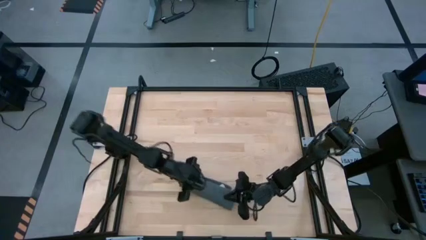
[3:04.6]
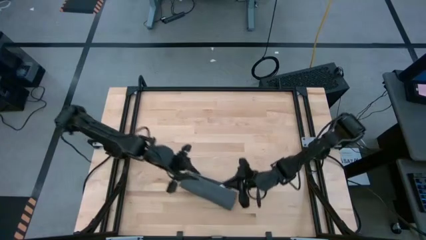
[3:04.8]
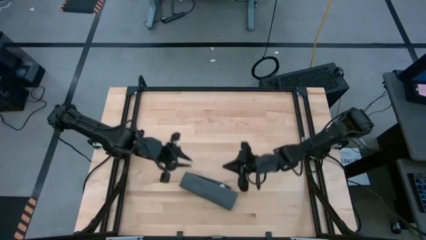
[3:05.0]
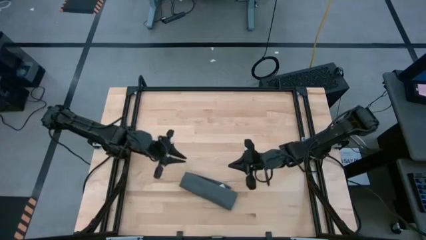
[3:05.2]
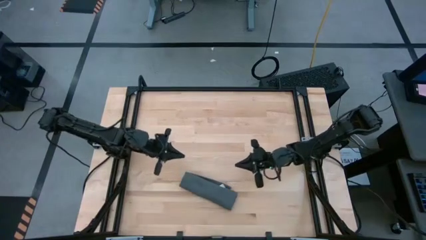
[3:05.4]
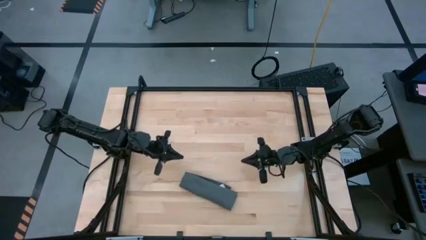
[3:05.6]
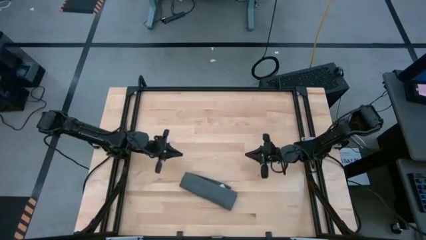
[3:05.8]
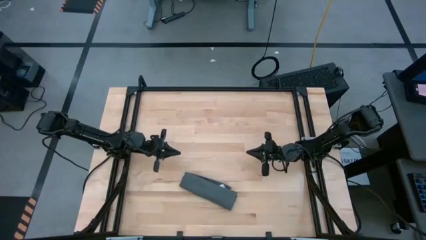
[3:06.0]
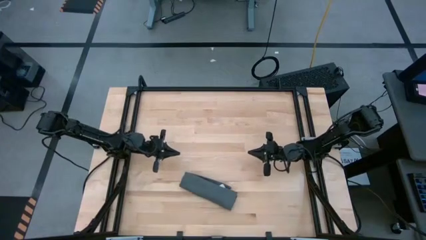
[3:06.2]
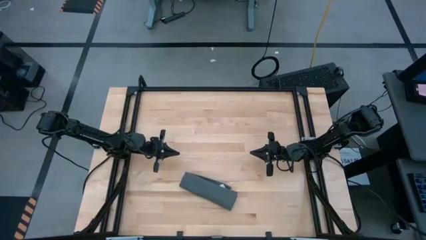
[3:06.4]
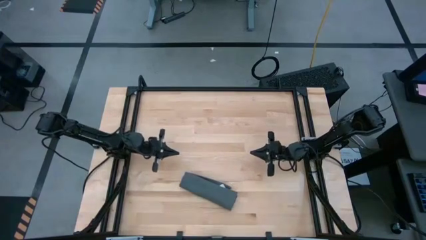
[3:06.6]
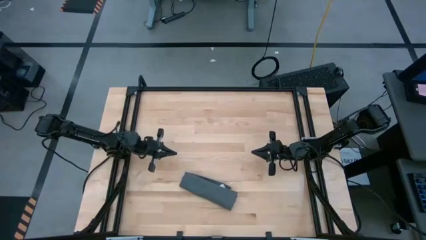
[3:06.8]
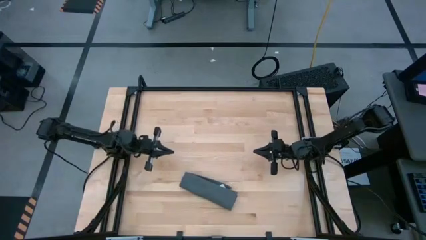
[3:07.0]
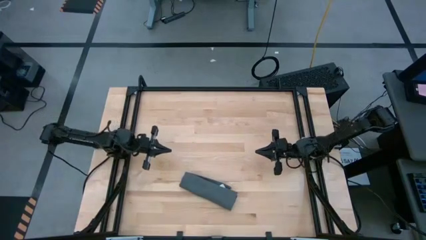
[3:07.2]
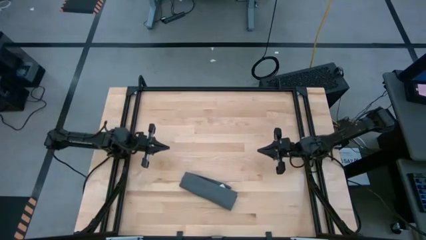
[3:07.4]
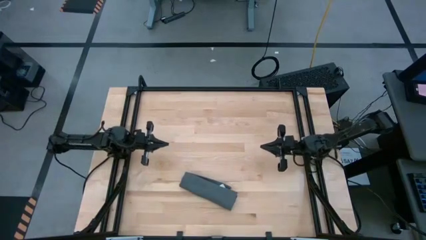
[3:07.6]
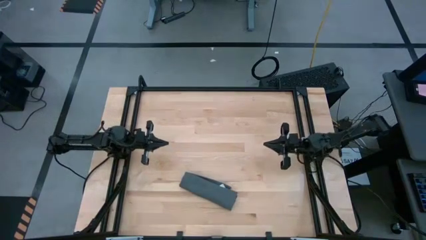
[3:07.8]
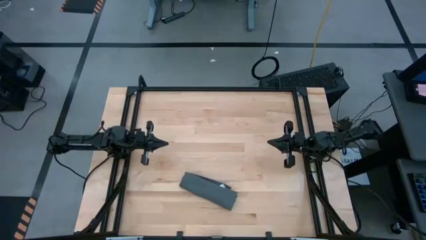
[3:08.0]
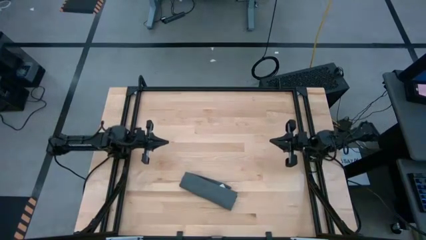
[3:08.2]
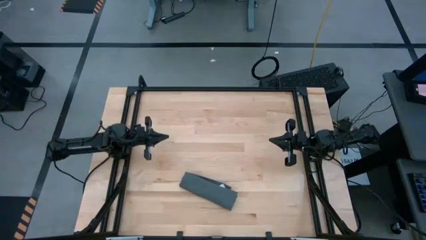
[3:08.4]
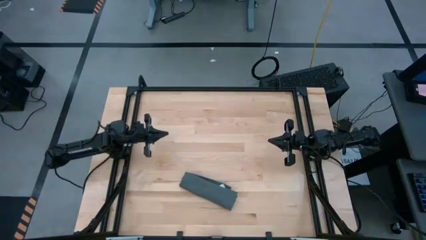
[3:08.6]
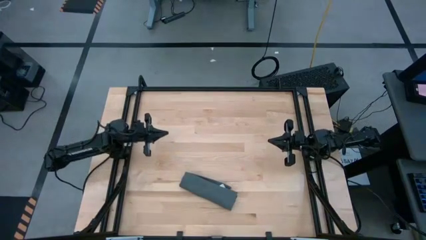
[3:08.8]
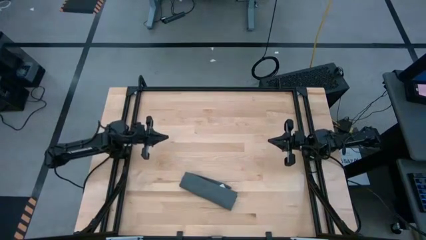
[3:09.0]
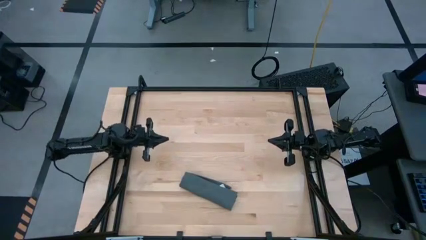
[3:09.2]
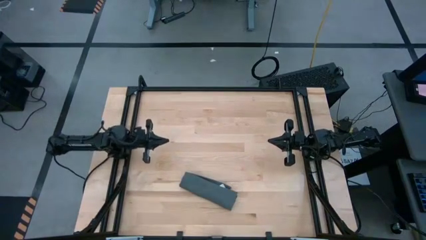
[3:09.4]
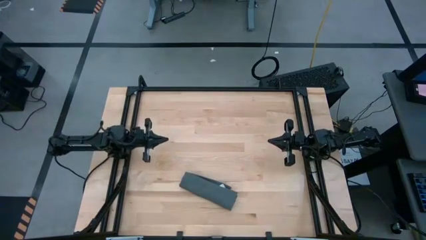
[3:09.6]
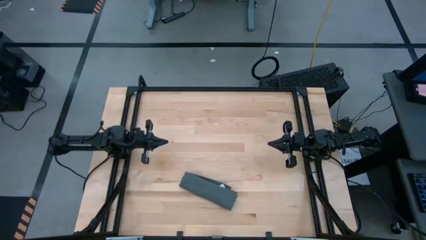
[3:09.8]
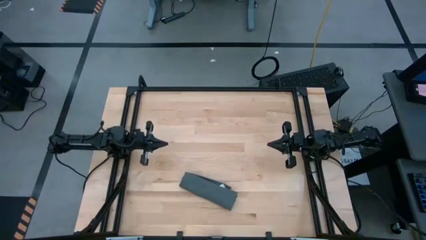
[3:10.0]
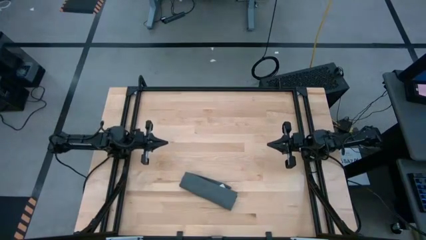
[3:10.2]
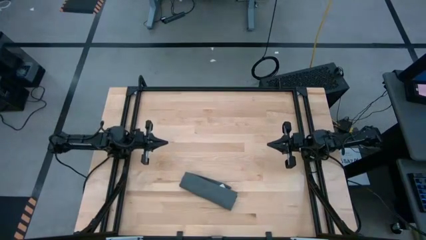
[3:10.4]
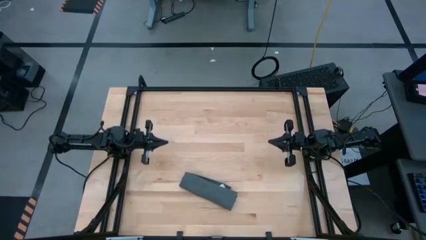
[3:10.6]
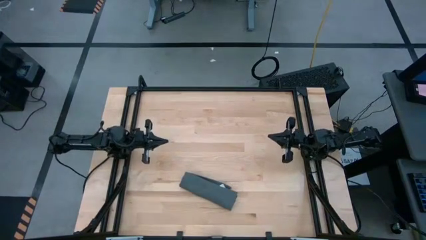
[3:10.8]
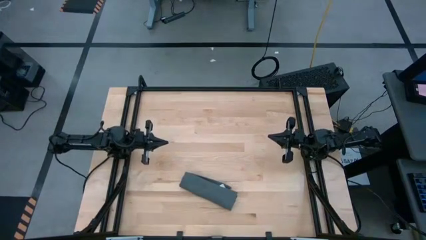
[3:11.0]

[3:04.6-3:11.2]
Task: Roll towel
Return to Home Position

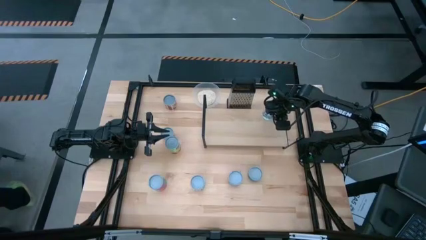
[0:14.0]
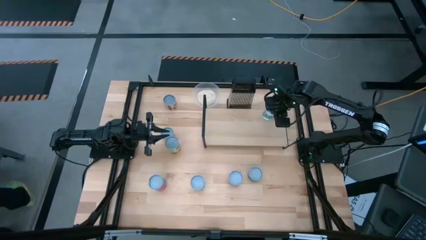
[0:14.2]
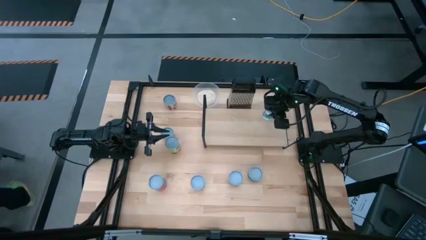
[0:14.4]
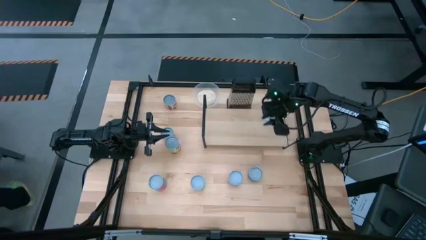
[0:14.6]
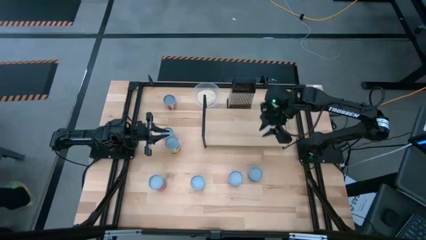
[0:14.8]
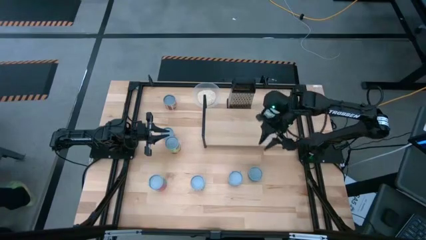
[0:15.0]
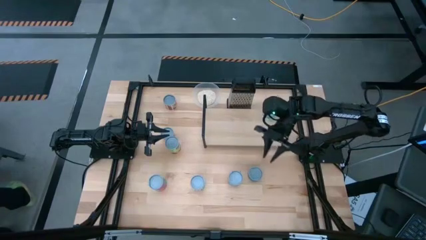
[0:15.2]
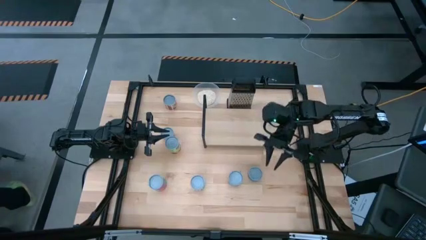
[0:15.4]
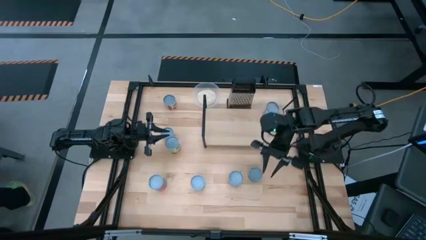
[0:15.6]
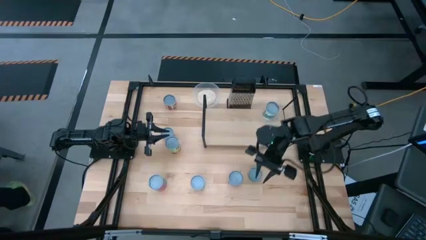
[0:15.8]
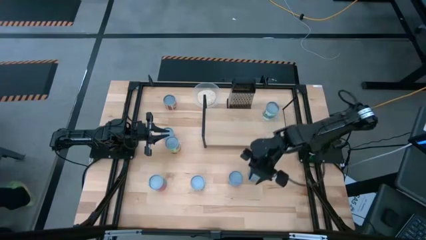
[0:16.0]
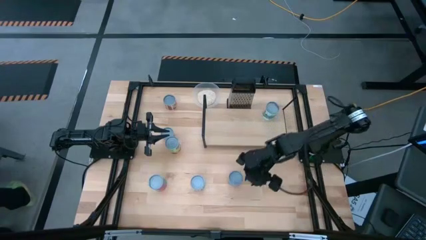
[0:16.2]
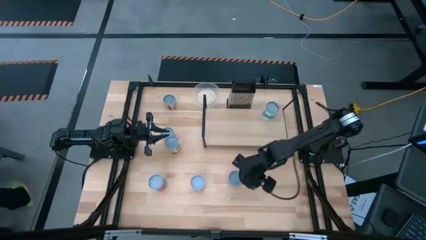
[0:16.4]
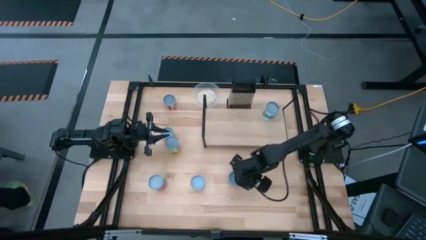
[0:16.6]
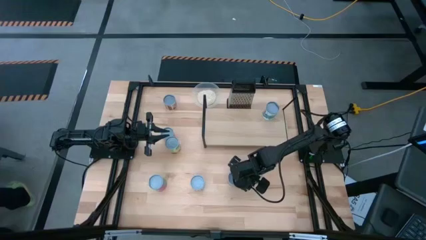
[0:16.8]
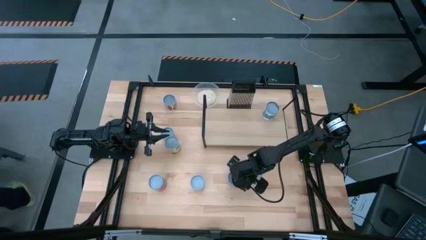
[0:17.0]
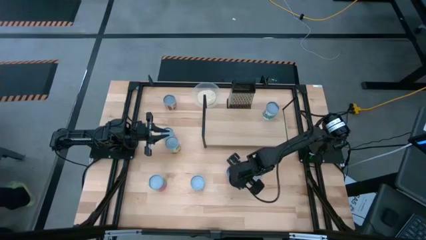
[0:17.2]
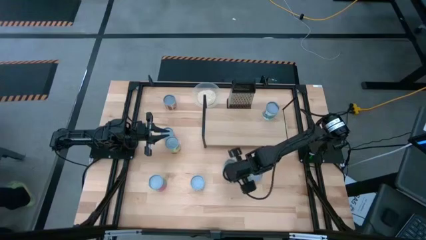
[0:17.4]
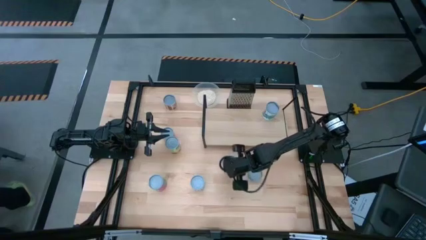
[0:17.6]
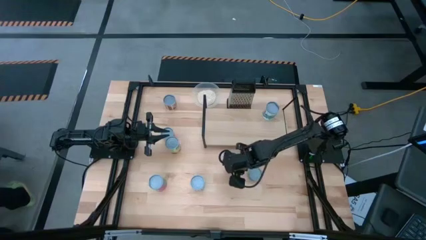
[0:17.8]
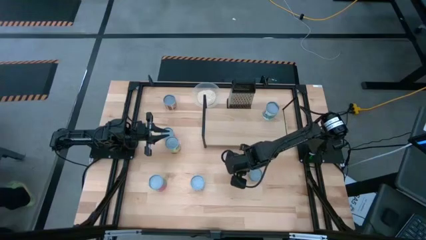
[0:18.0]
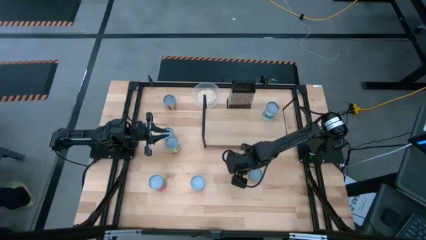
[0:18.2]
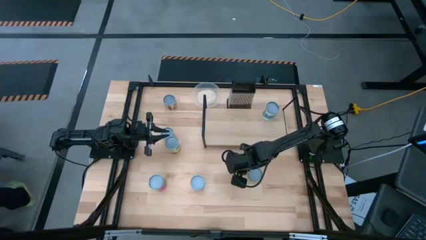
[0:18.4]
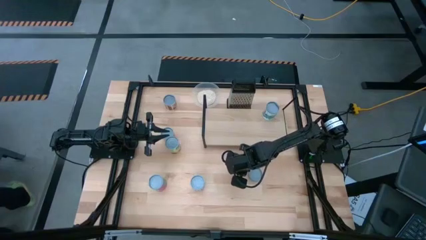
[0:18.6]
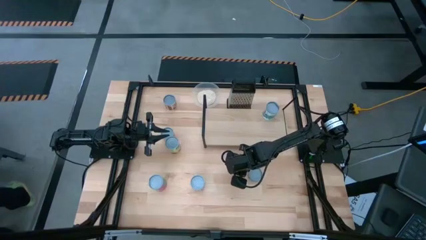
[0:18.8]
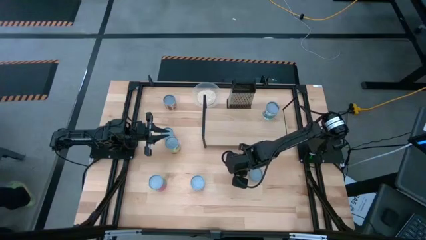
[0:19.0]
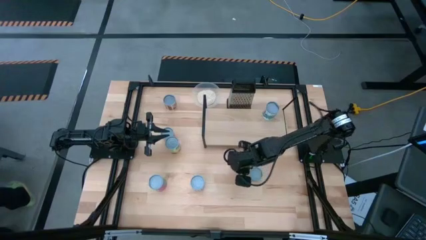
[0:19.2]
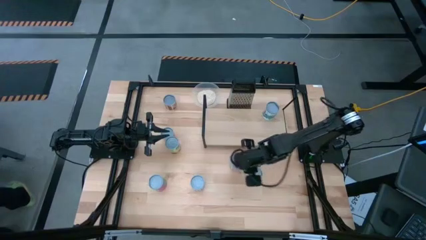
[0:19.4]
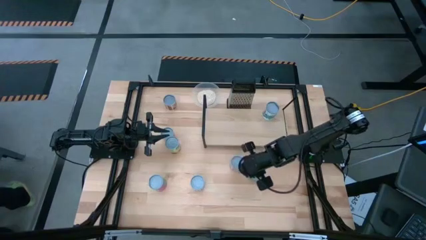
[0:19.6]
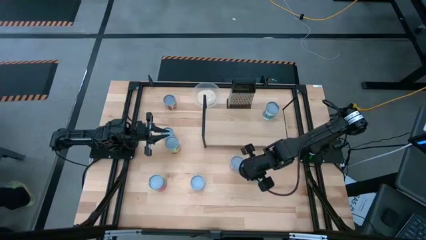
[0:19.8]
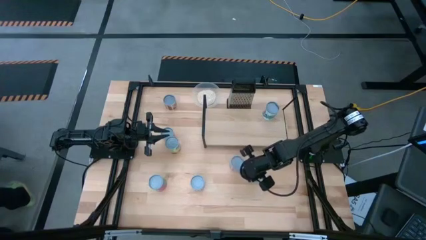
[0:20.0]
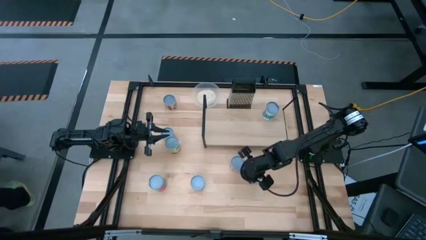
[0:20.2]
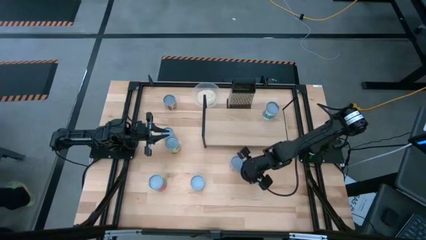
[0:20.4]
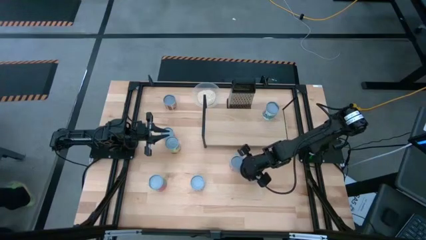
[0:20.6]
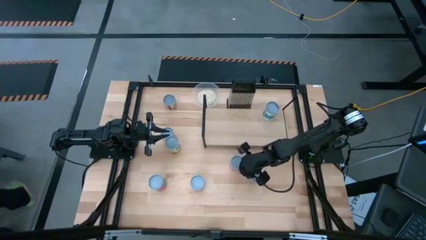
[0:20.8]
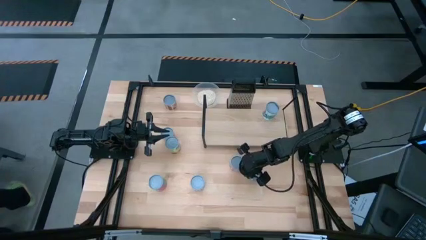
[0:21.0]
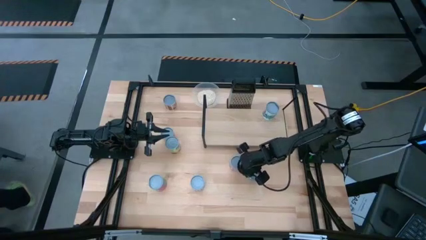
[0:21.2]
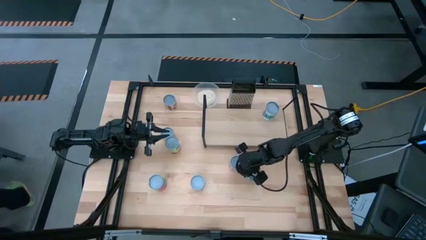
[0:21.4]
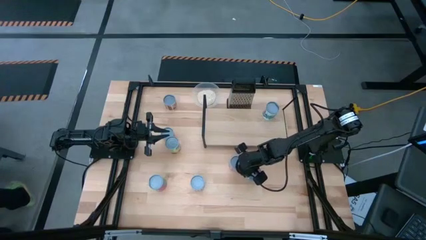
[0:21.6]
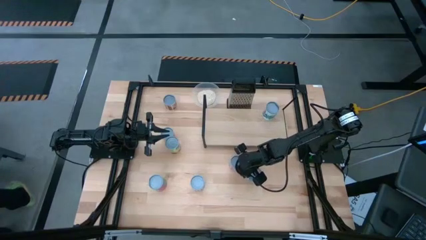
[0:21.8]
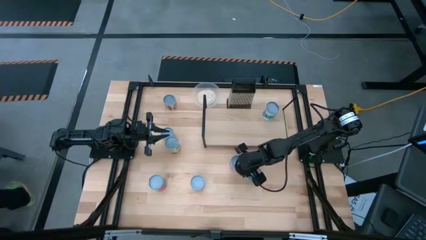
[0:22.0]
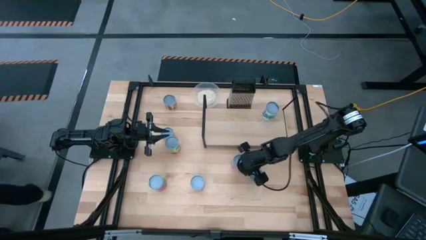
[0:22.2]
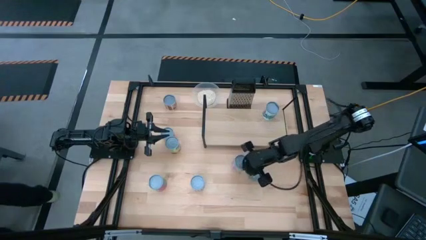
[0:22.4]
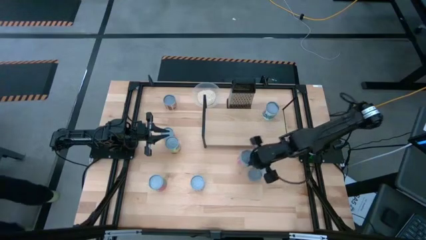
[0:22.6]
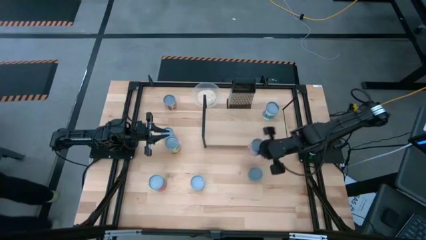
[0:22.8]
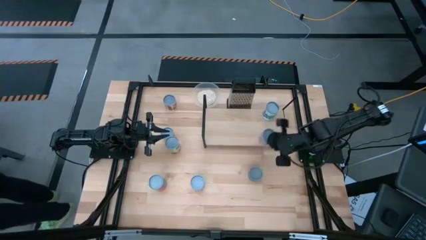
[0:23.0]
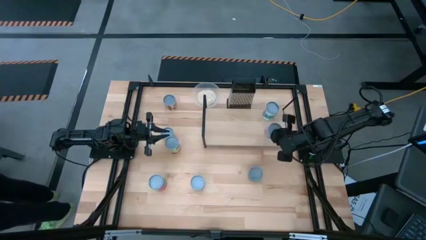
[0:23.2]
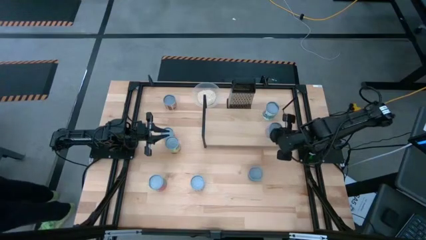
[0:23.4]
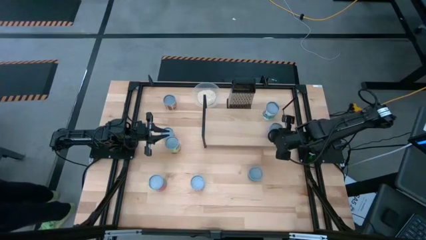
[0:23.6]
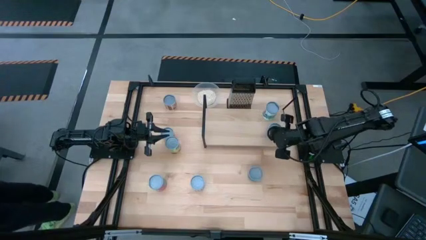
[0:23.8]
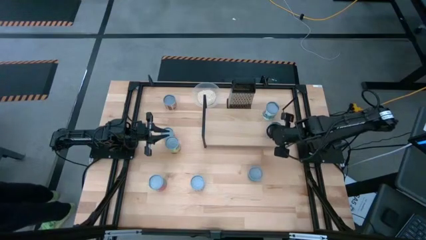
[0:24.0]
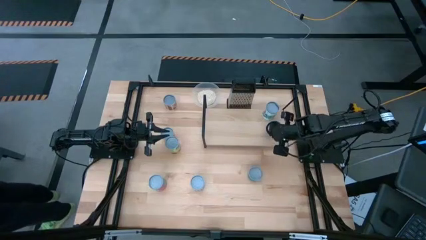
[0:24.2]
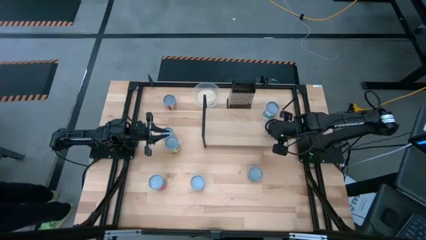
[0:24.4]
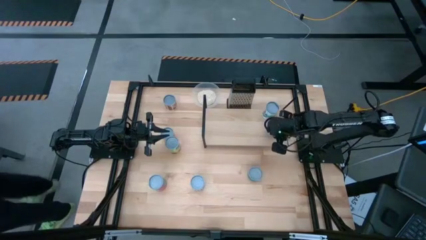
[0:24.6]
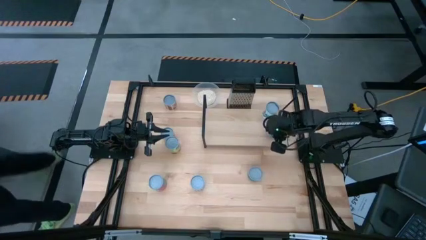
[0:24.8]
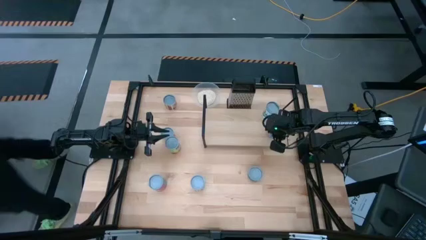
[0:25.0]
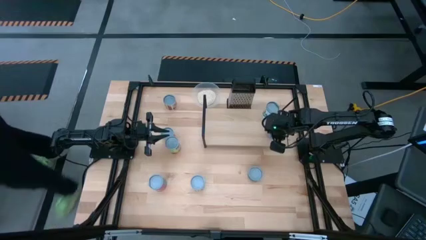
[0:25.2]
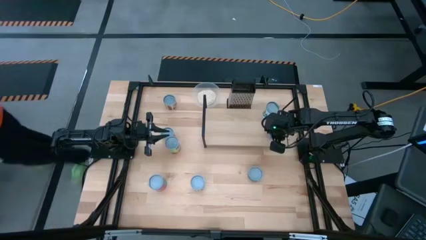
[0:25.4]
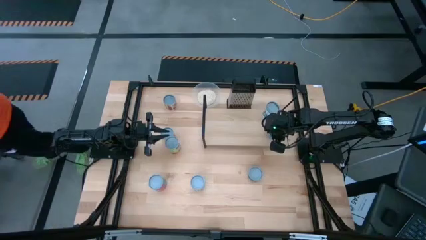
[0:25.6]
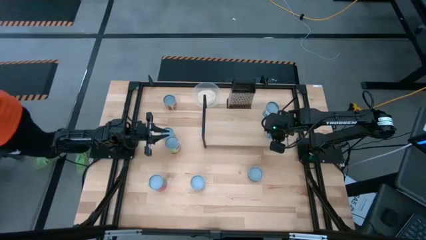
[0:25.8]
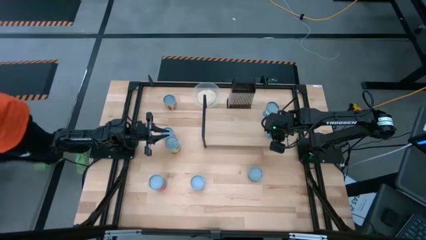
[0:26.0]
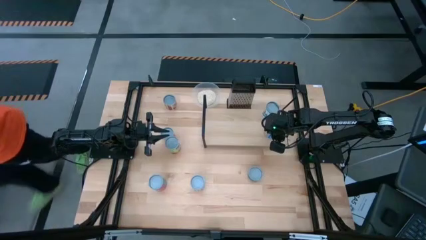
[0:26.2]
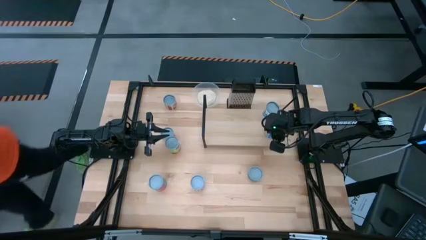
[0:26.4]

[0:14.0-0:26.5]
Task: Pick and place cans onto a shelf
Put the blue canned corn on the shelf
